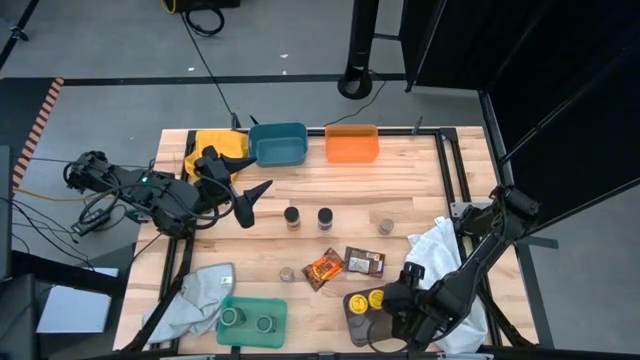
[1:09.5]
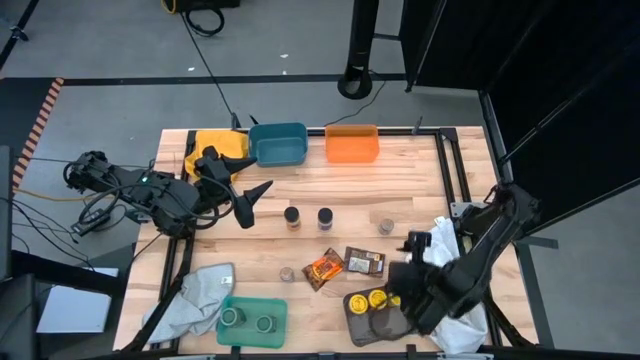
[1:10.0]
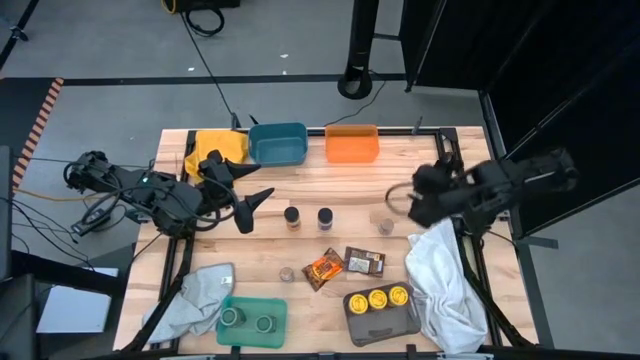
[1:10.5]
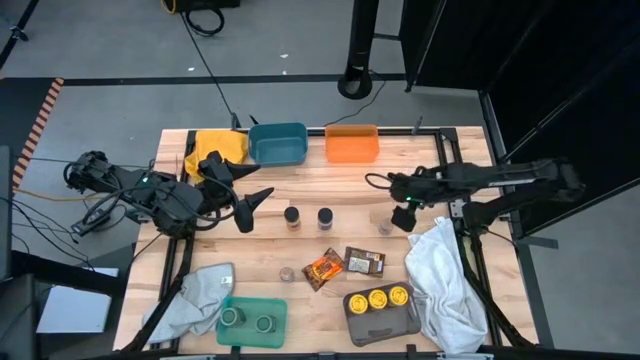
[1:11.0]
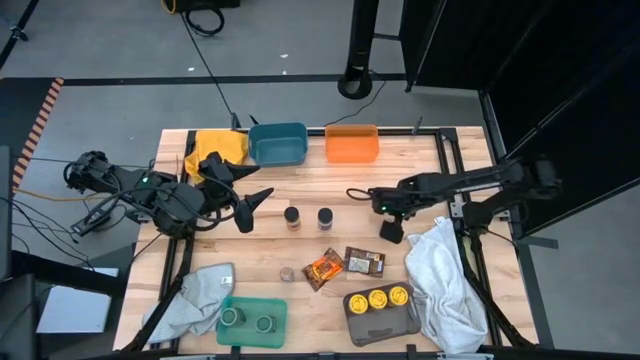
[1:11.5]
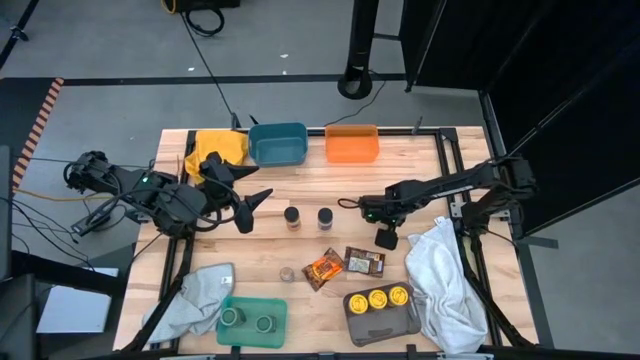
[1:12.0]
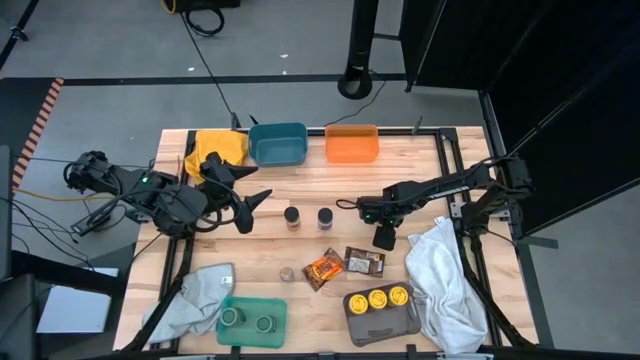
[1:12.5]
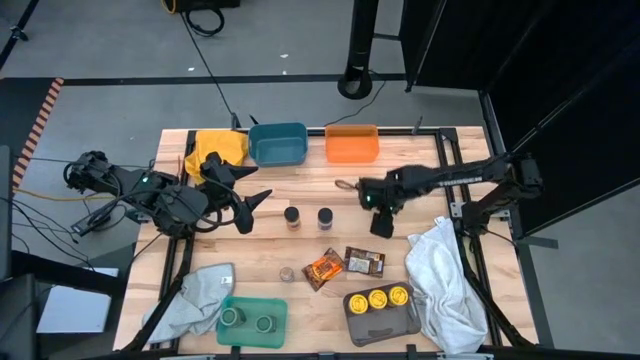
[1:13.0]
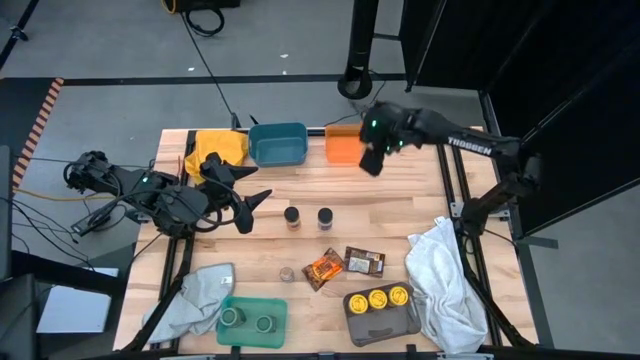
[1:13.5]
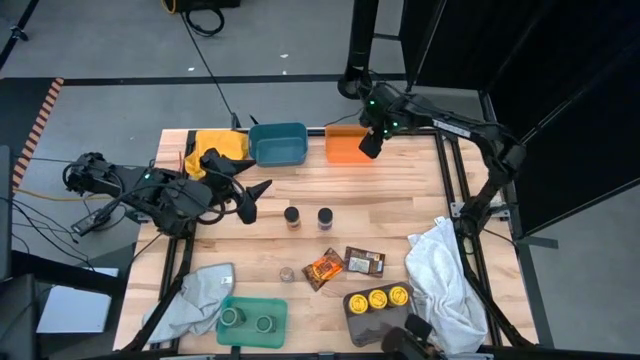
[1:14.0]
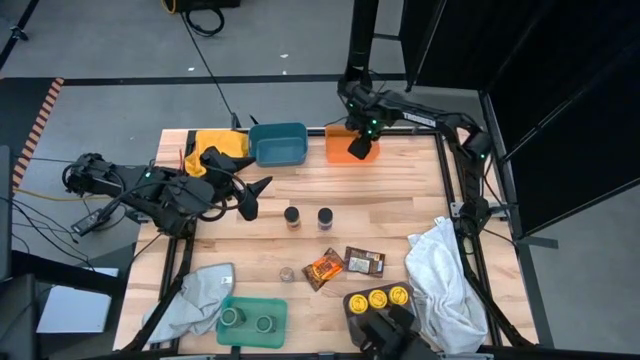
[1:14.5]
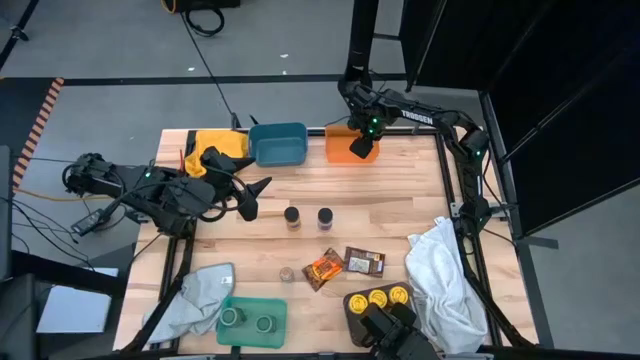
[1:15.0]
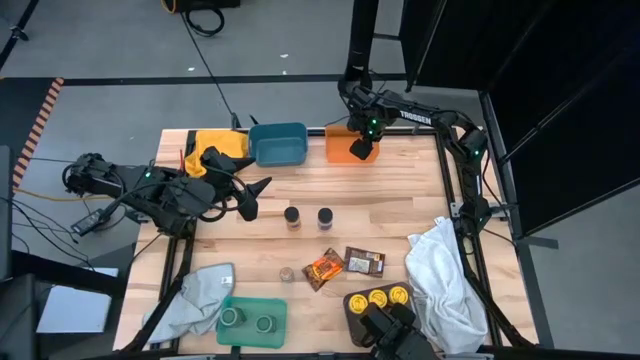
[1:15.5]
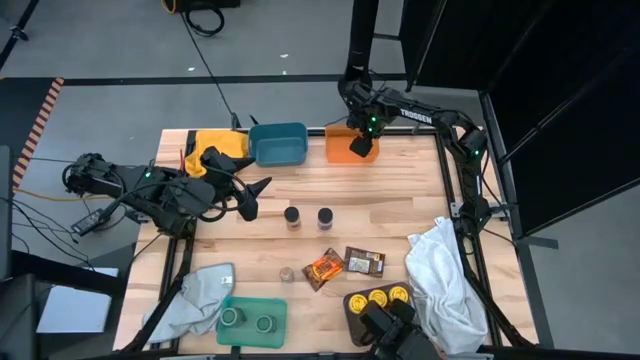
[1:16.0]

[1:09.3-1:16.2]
Task: Sort spices by type
Put the top brown seasoning bottle into the orange bin

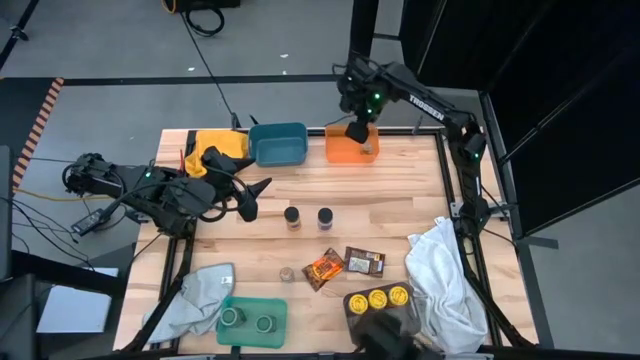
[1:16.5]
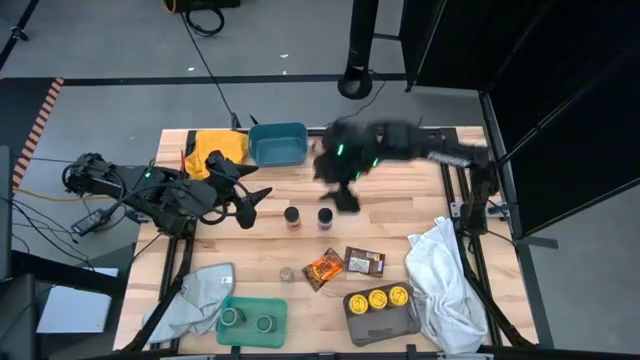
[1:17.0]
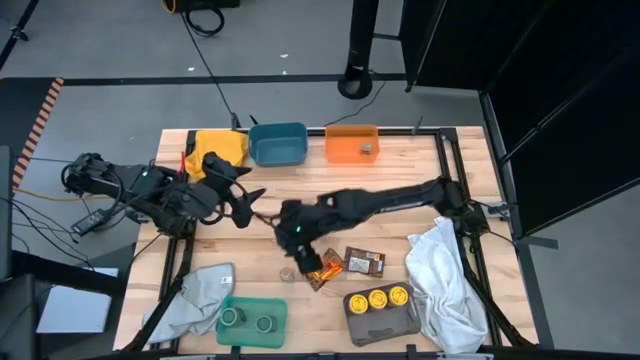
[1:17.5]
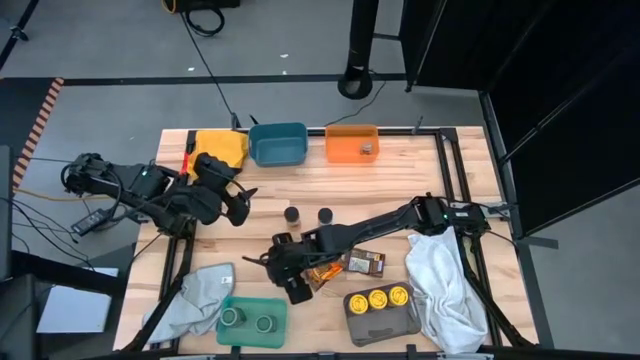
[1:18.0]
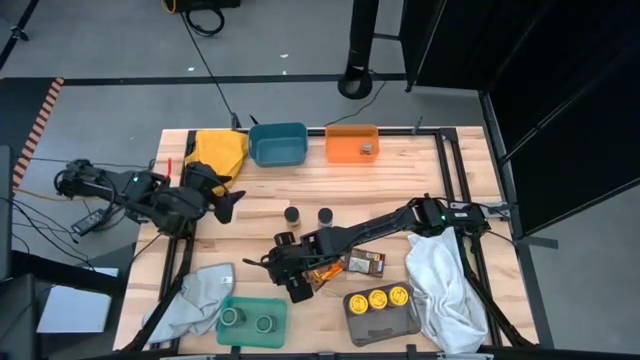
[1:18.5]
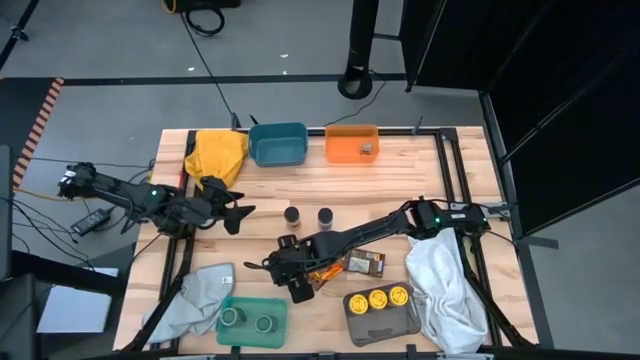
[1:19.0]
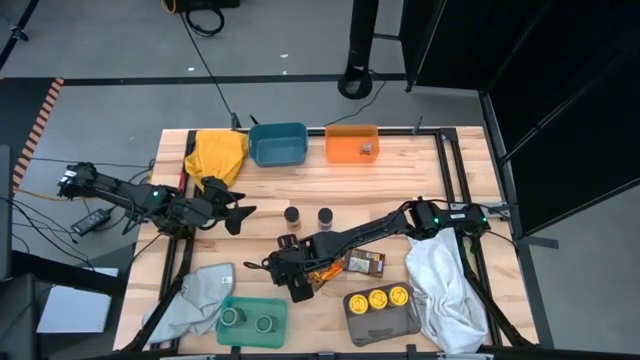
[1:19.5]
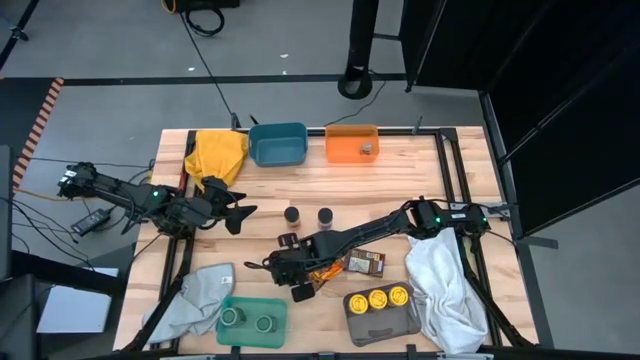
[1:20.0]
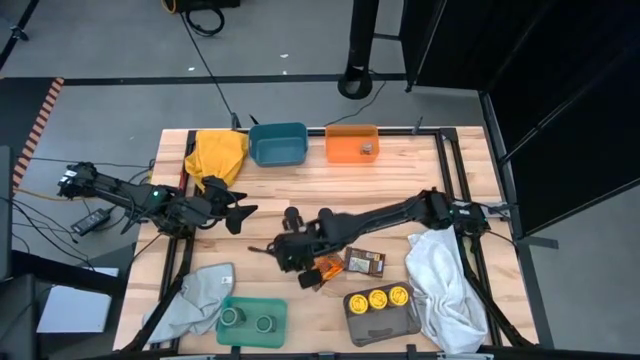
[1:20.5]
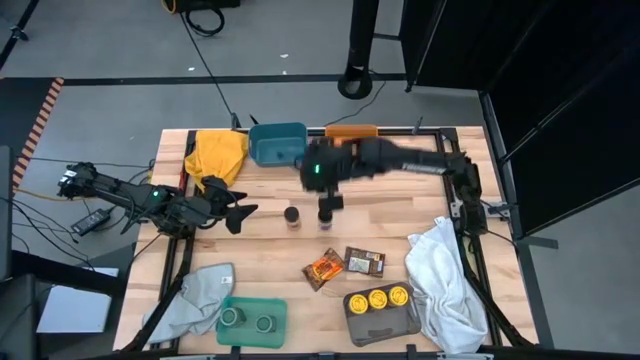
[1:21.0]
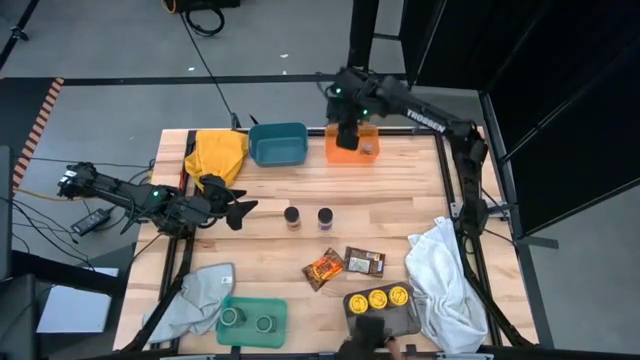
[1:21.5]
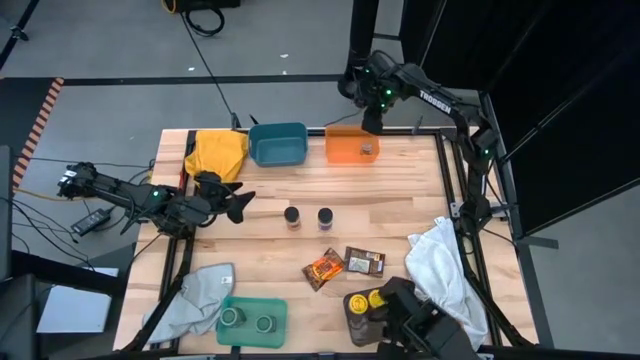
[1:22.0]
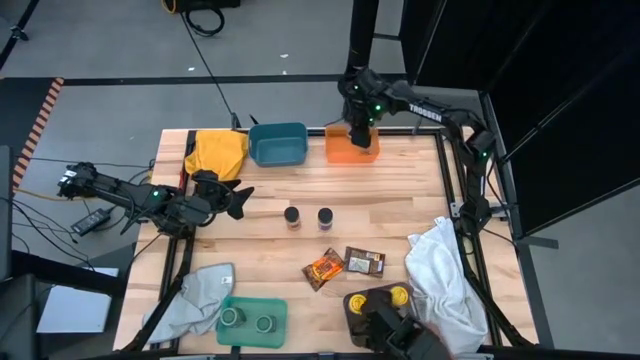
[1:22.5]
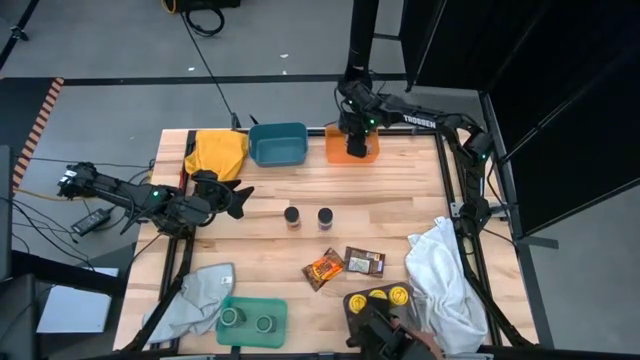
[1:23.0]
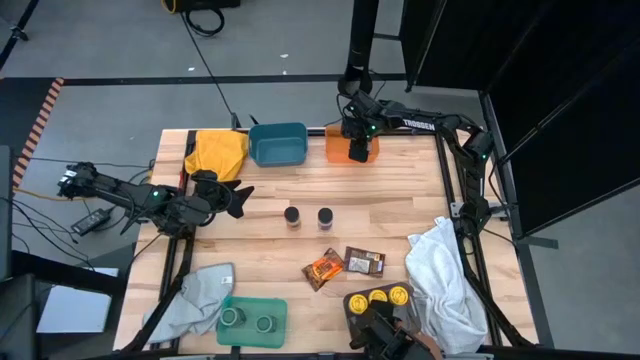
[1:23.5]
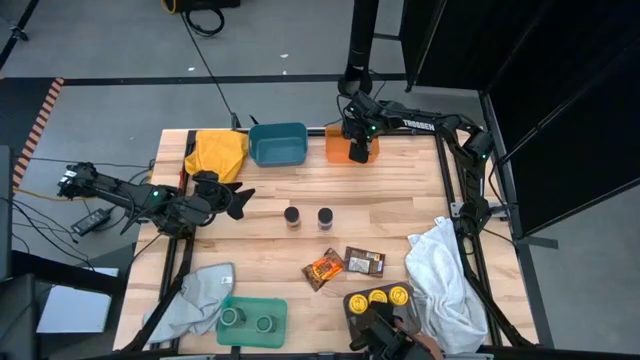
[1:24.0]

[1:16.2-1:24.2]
Put the brown seasoning bottle into the orange bin

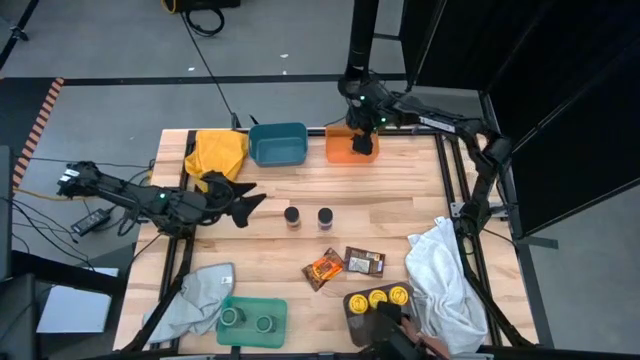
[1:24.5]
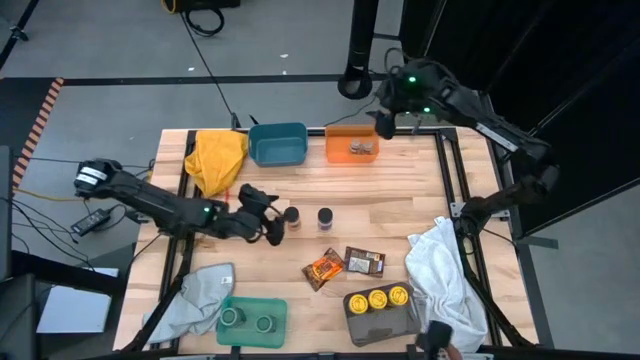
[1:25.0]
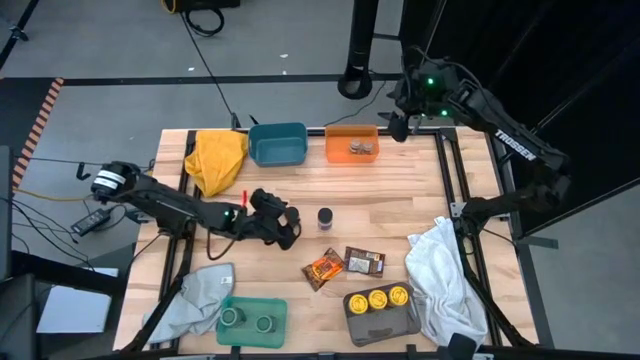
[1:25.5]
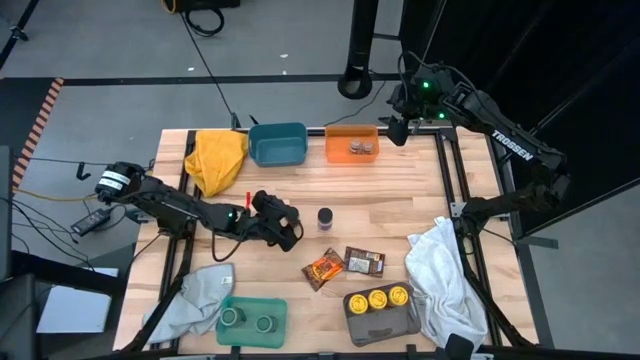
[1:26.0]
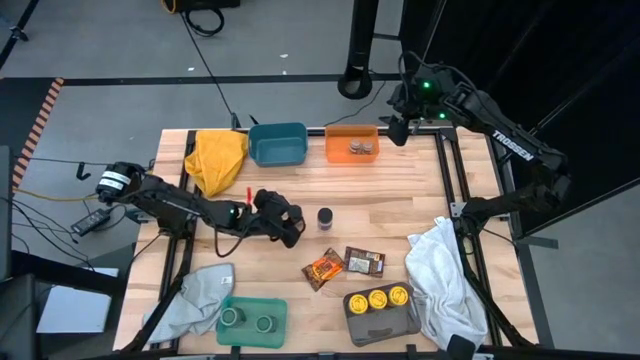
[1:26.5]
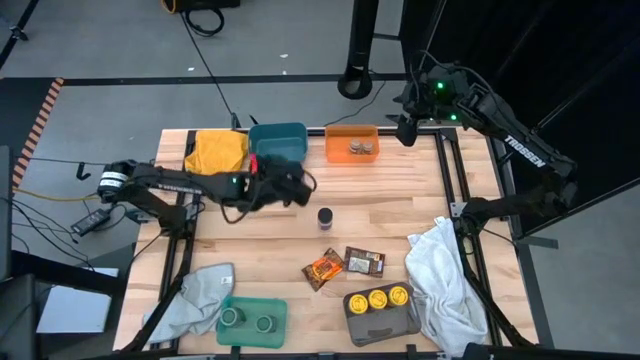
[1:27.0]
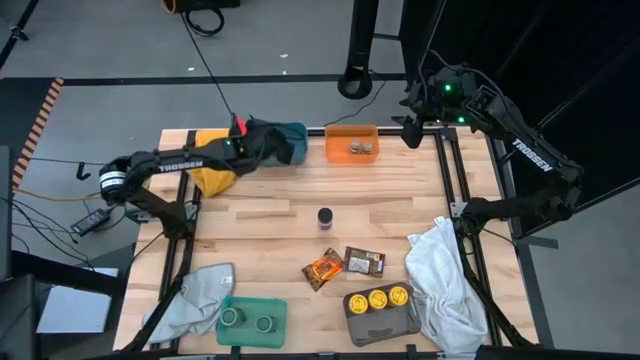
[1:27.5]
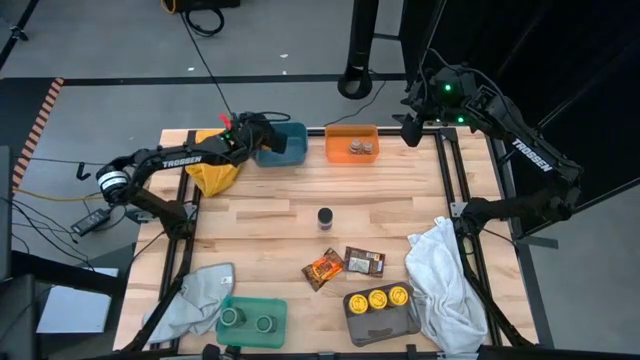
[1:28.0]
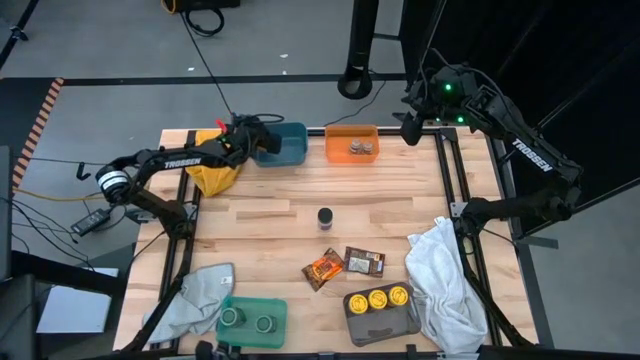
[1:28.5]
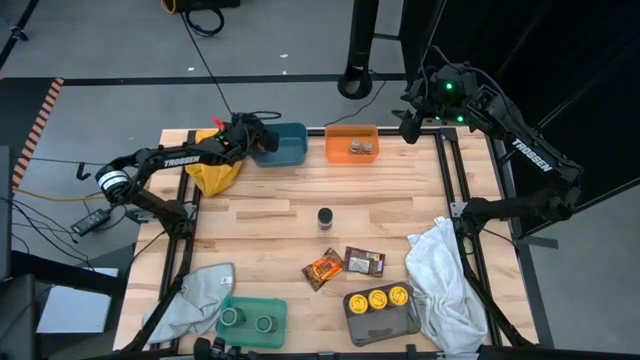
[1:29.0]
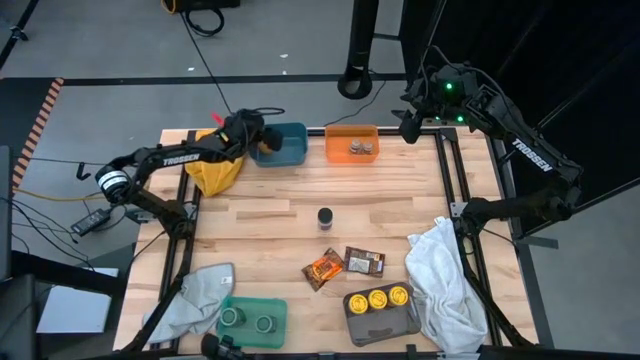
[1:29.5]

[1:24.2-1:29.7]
Put the left black seasoning bottle into the blue bin

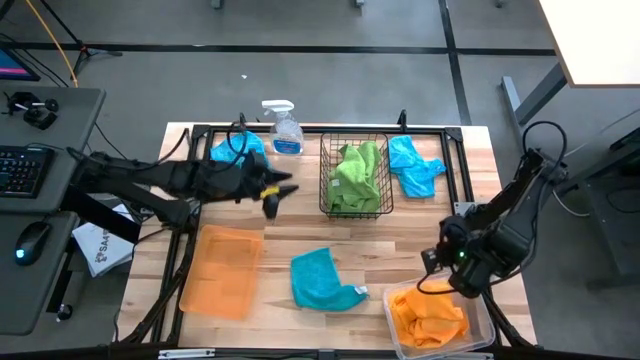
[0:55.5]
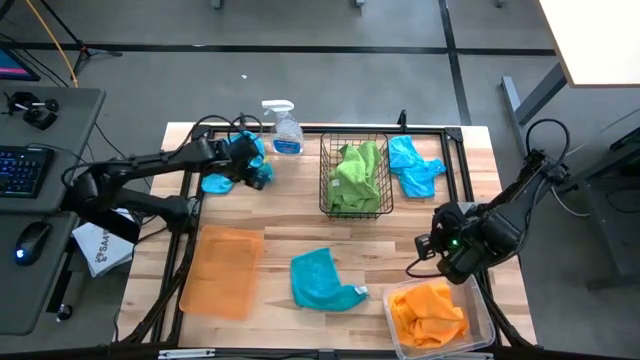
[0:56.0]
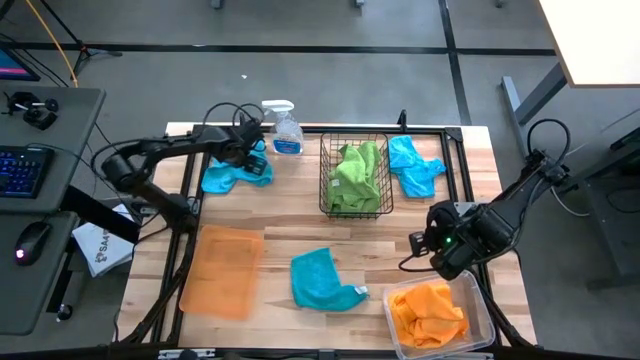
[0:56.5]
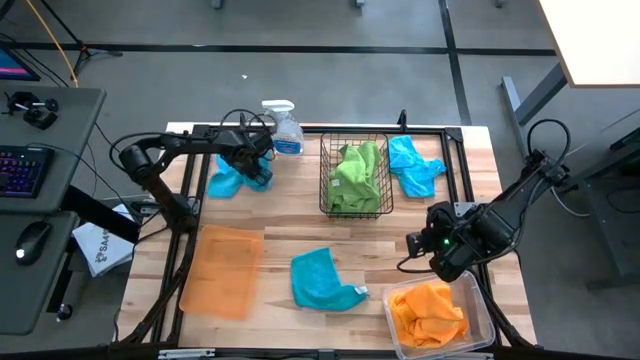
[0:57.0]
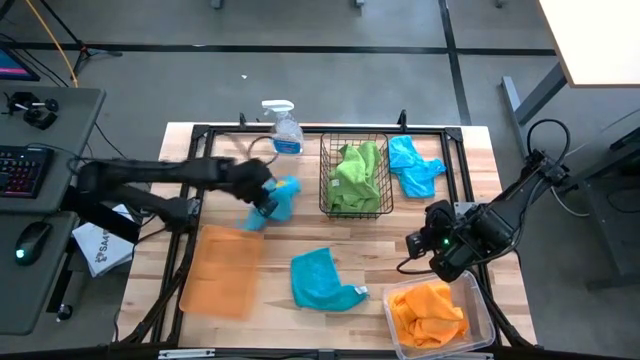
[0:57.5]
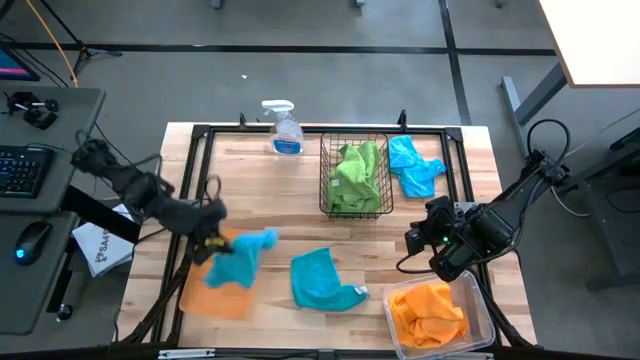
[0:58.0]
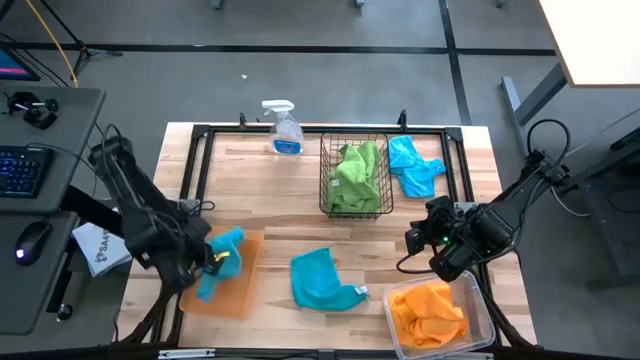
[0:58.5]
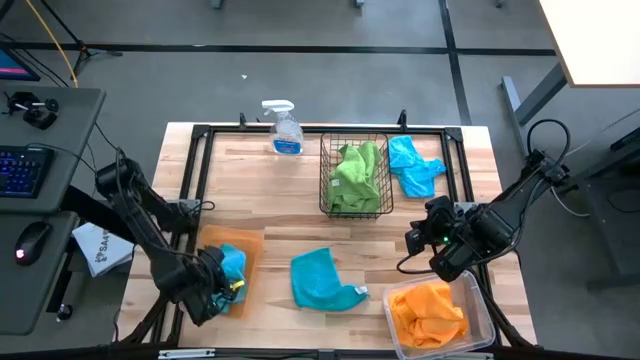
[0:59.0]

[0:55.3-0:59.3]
Task: Sort microfiber towel by color & place in baskets
Put the top left blue microfiber cloth into the orange bin
